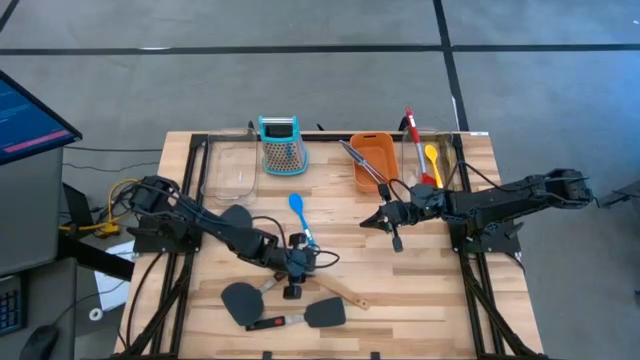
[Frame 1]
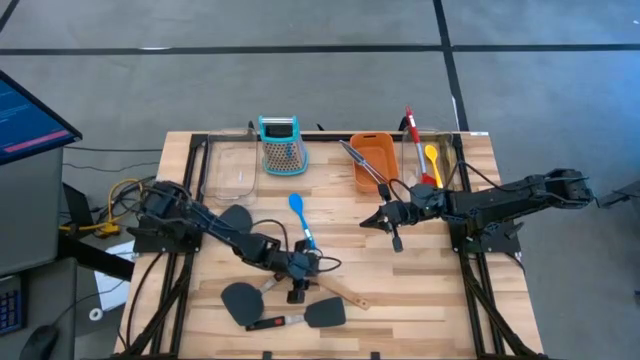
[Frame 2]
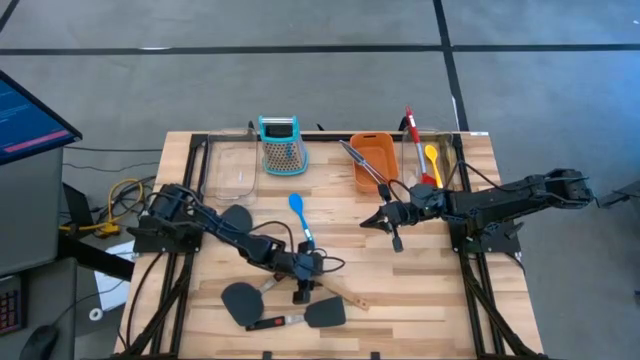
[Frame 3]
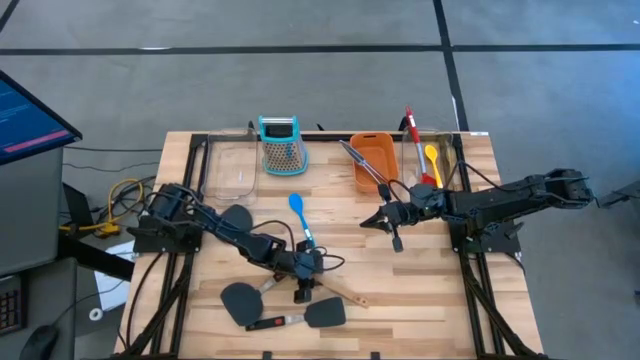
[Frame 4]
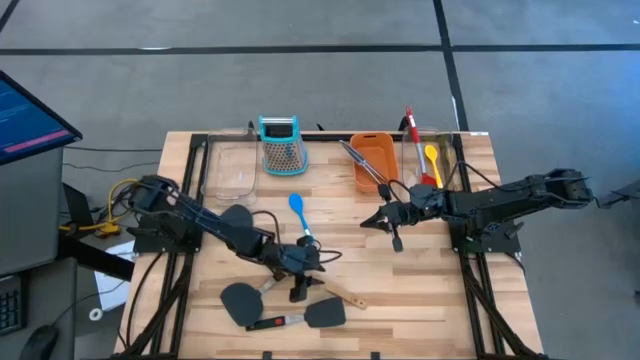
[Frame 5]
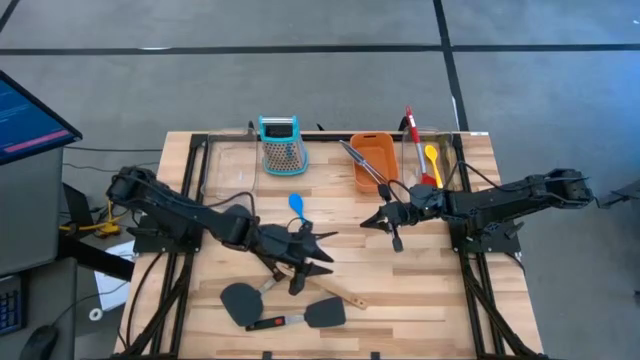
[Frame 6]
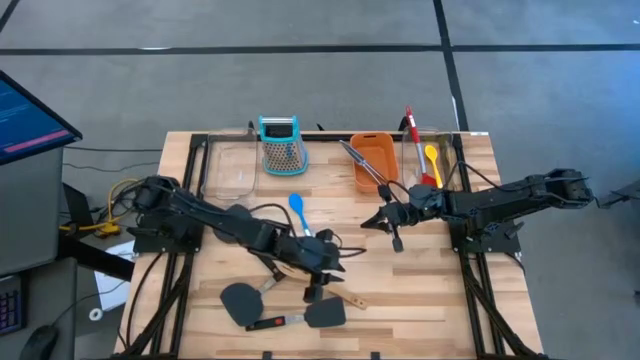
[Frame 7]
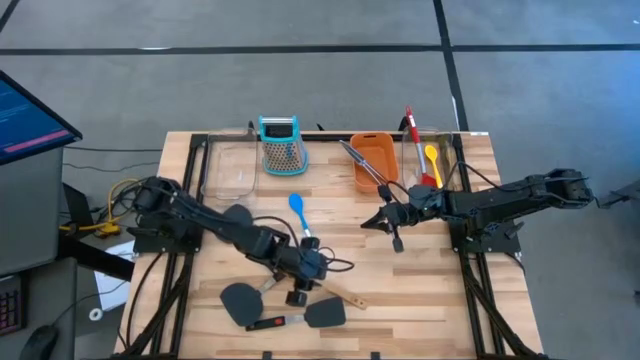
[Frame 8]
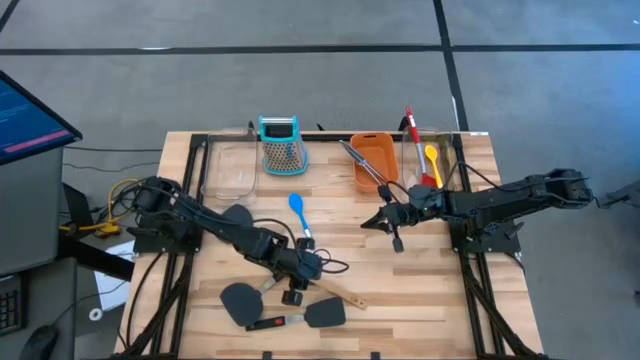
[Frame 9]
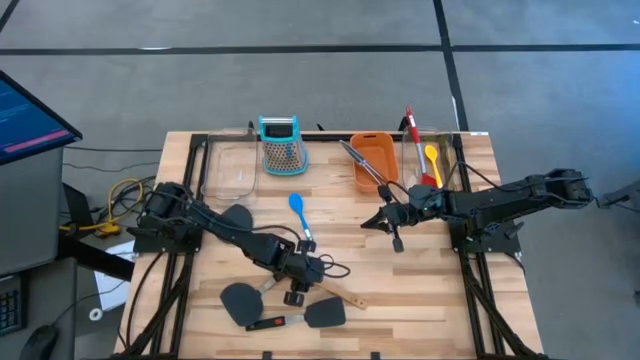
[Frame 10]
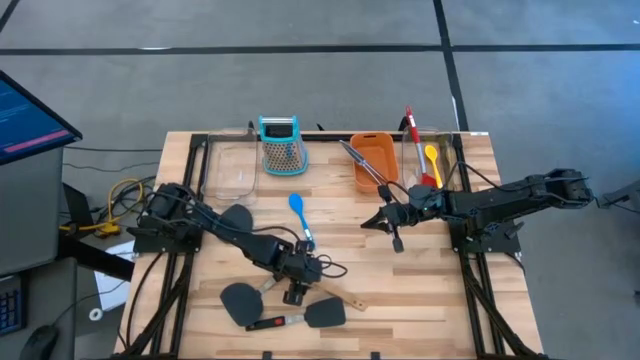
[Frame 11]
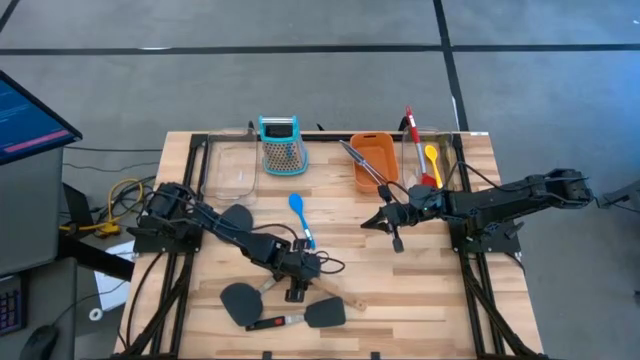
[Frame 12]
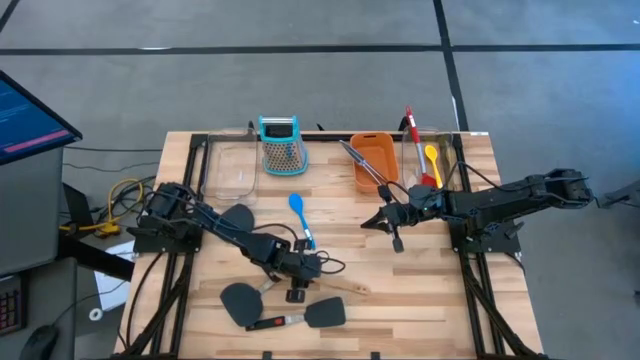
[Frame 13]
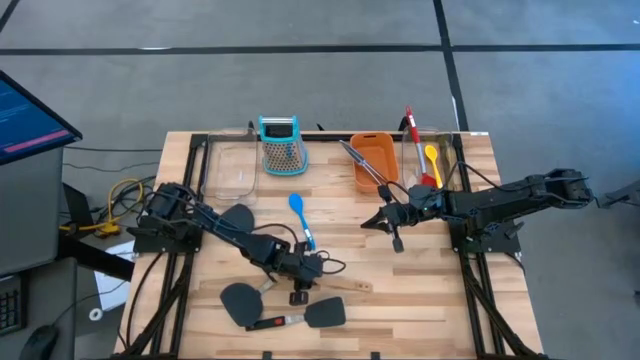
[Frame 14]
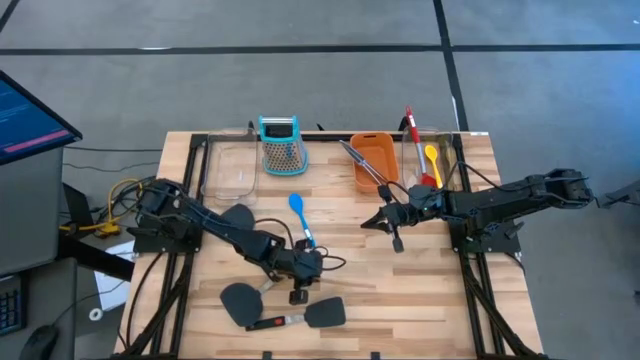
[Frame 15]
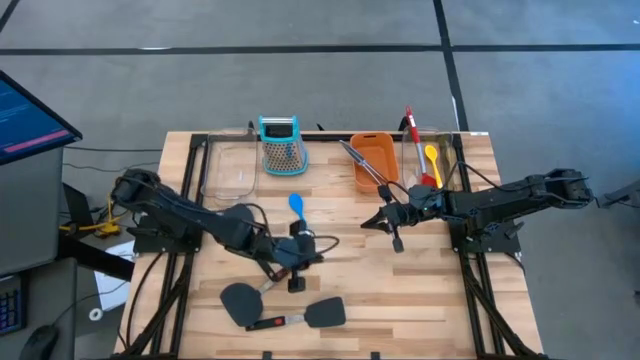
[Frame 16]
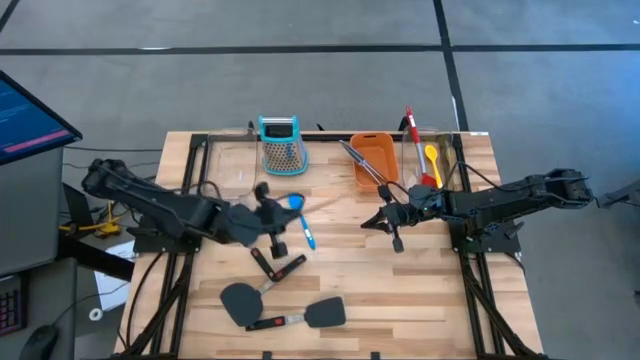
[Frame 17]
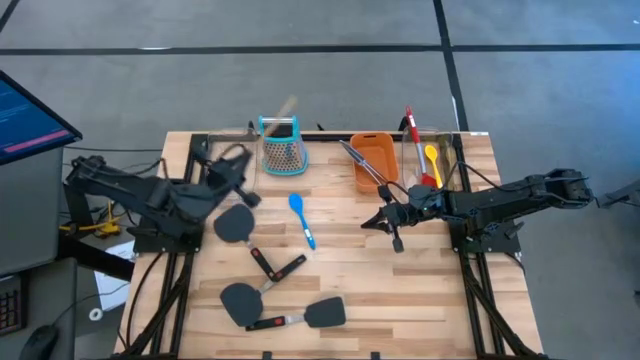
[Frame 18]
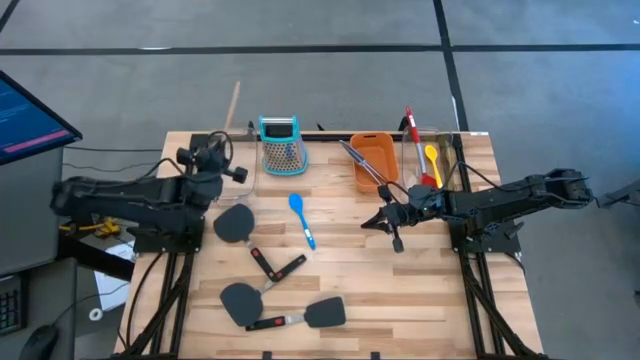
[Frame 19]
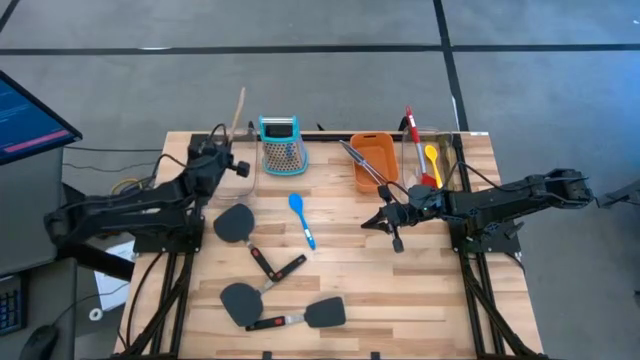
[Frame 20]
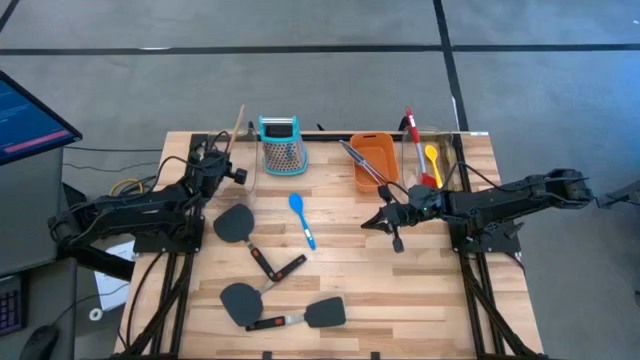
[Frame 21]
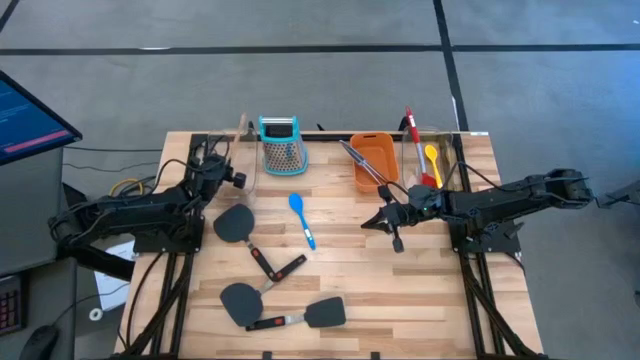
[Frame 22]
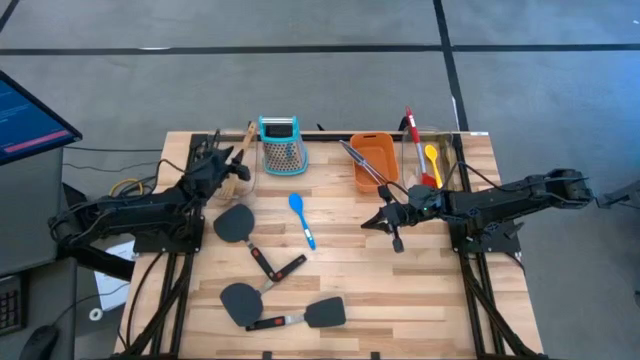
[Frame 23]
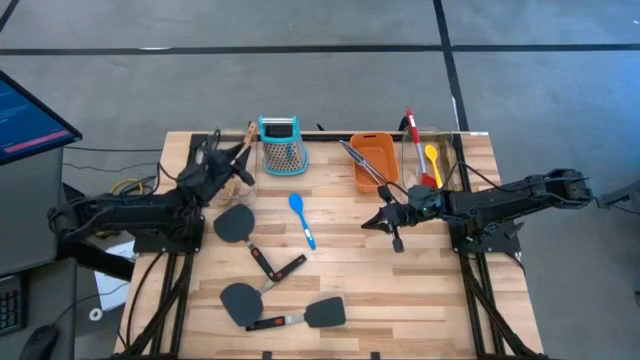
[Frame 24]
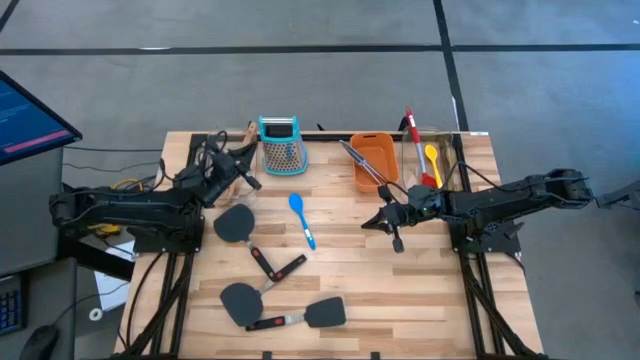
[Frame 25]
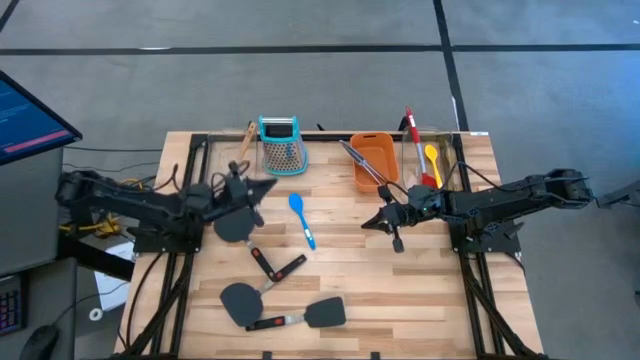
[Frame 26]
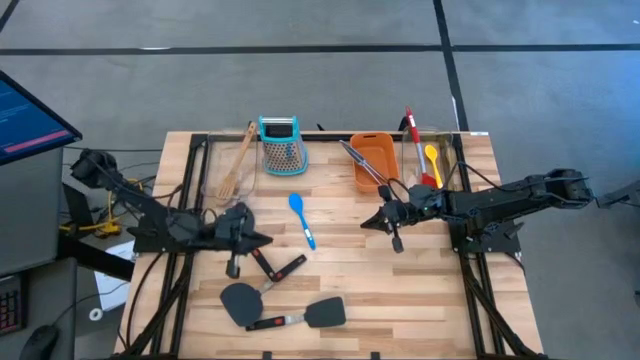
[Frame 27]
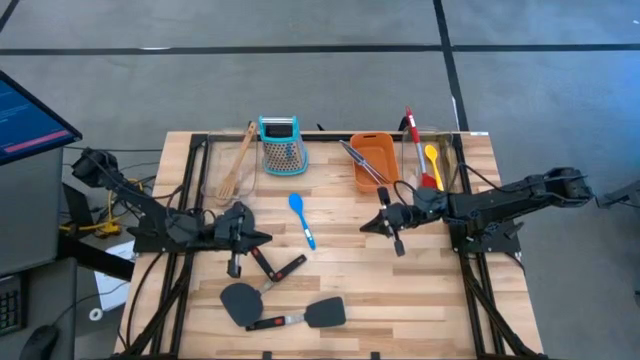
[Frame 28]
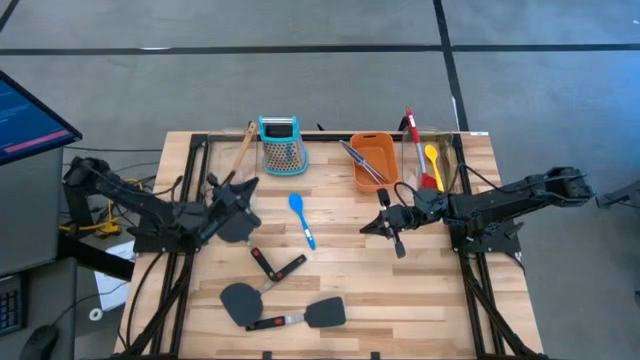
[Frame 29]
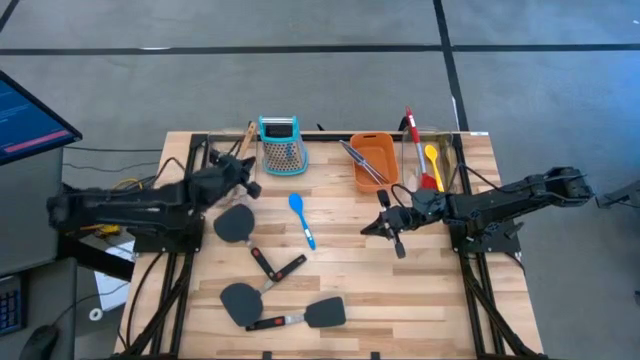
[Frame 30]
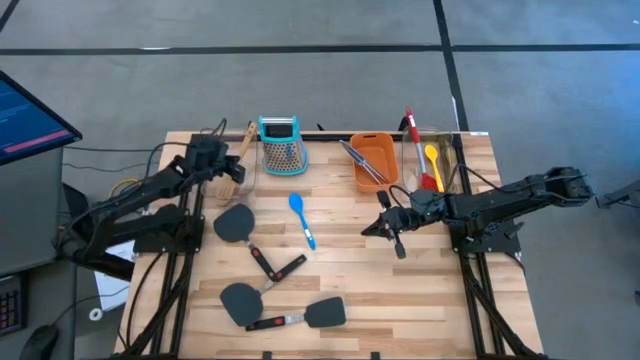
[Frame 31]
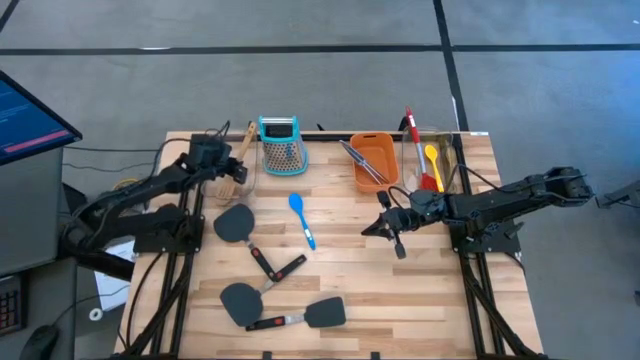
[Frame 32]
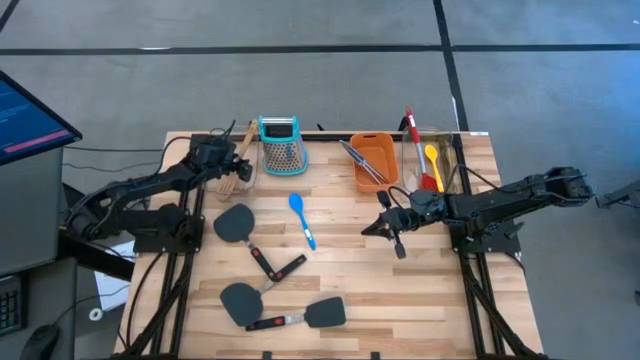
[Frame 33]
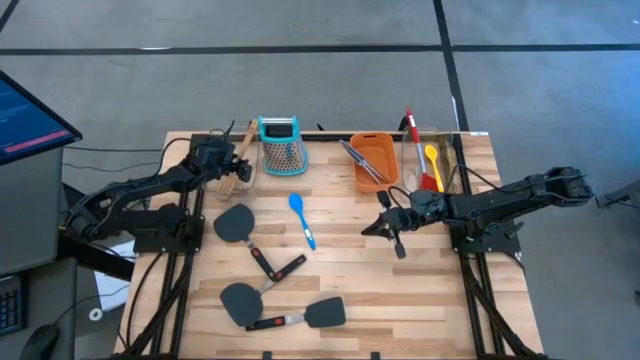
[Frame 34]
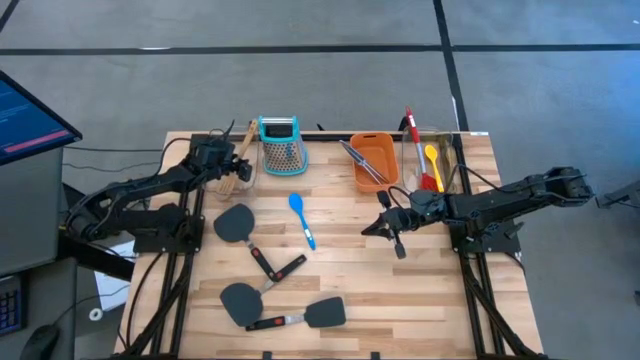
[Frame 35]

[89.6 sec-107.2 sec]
Task: Pick & Place Kitchen Items
Put the brown spatula into the right transparent bin

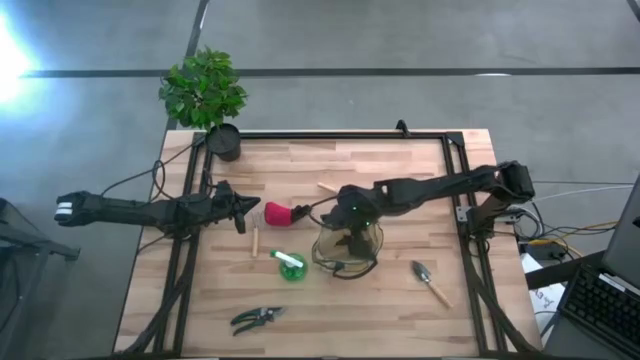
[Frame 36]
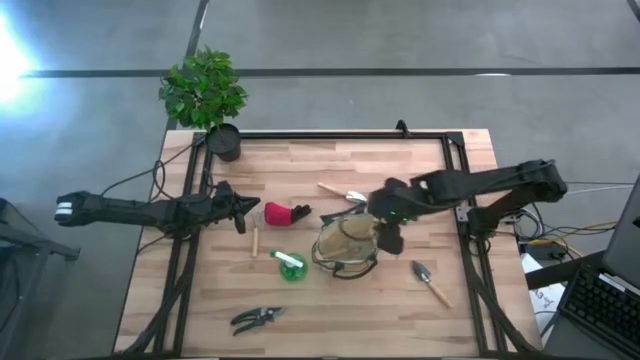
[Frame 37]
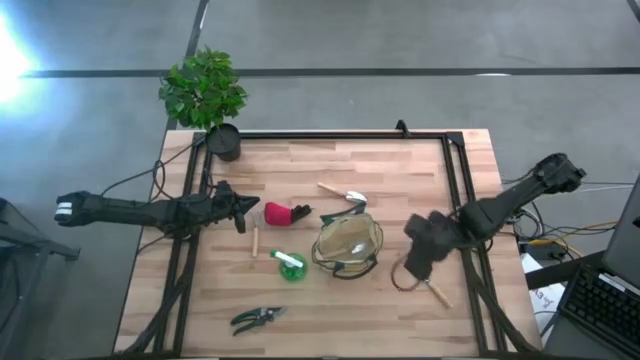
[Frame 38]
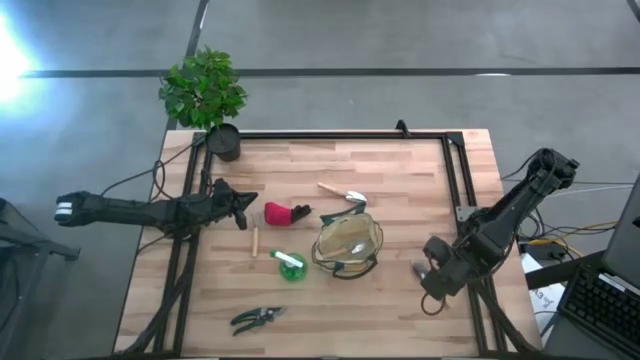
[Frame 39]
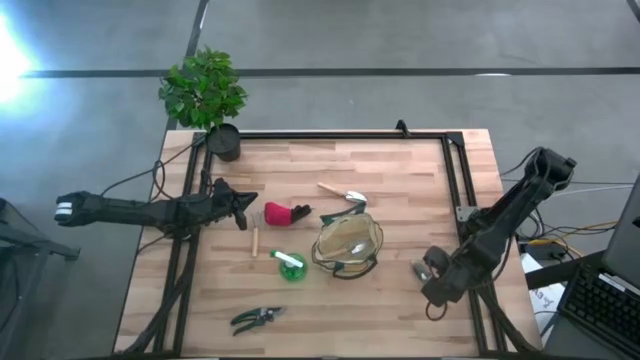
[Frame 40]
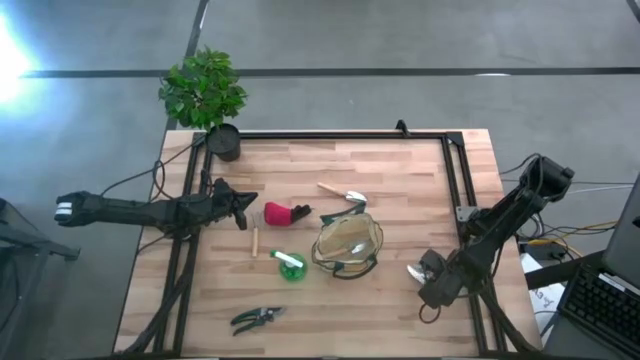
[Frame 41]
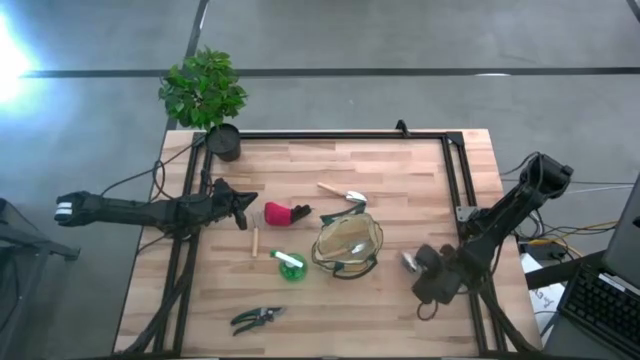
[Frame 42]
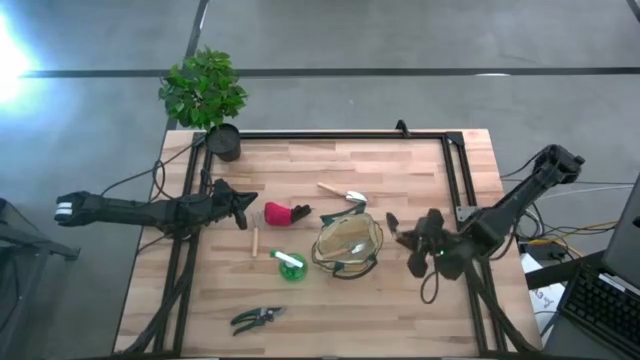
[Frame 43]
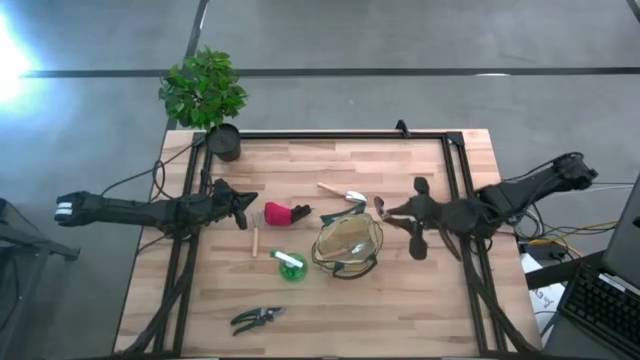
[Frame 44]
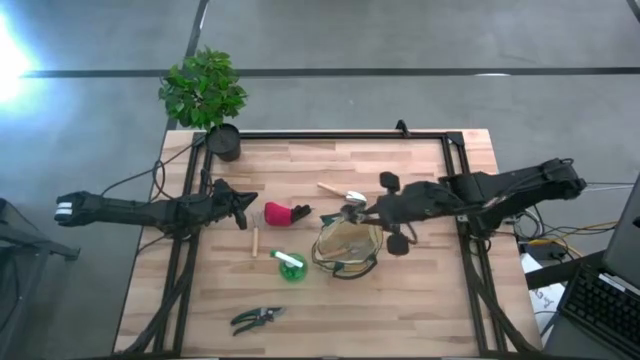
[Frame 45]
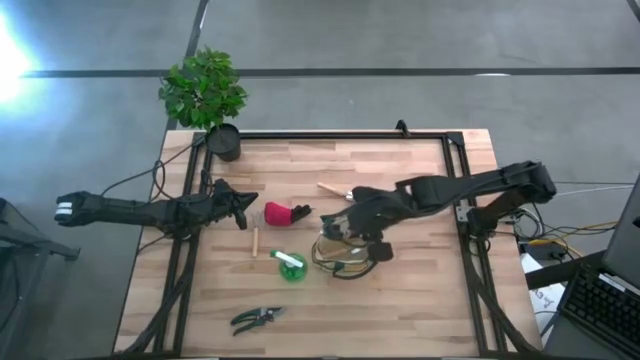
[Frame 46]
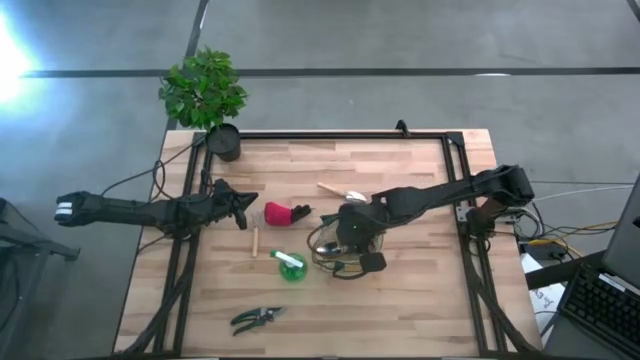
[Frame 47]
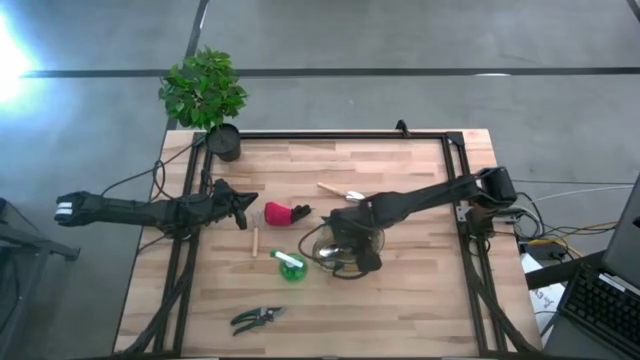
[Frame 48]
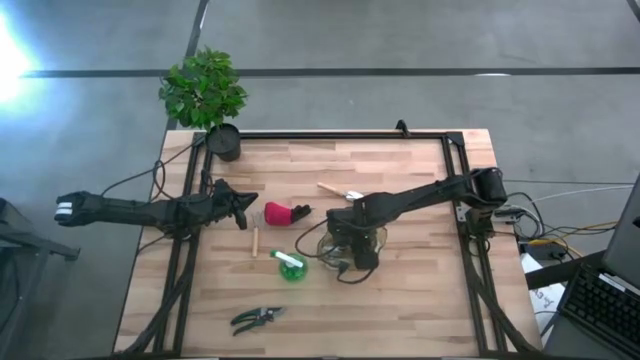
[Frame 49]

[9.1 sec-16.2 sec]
Task: Pick & Place Garden tools in Gardening bag
Put the bottom brown trowel into the gardening bag
